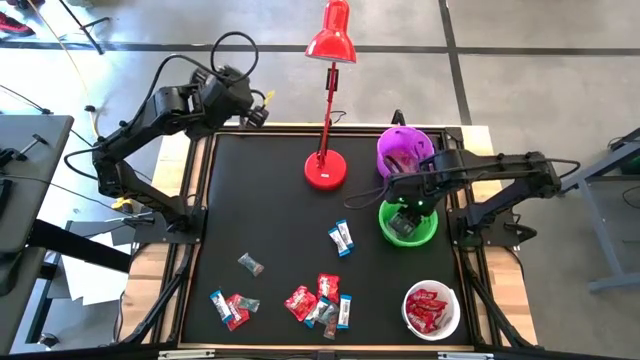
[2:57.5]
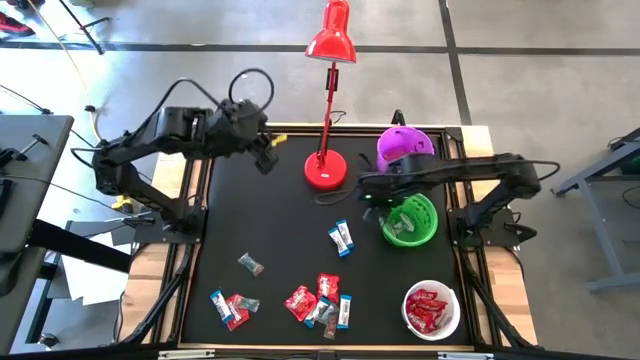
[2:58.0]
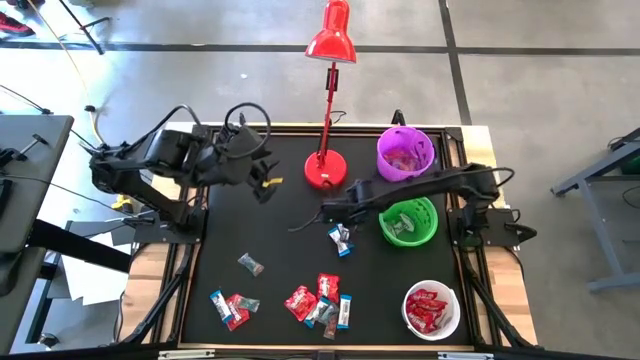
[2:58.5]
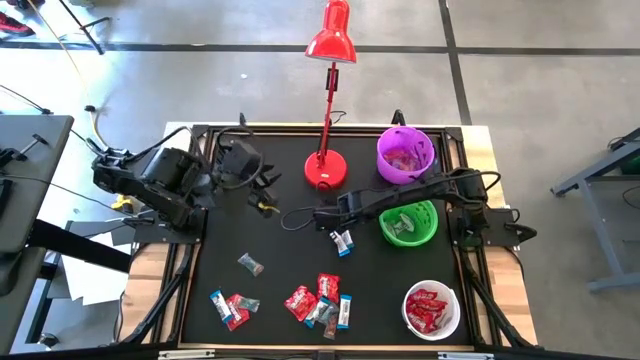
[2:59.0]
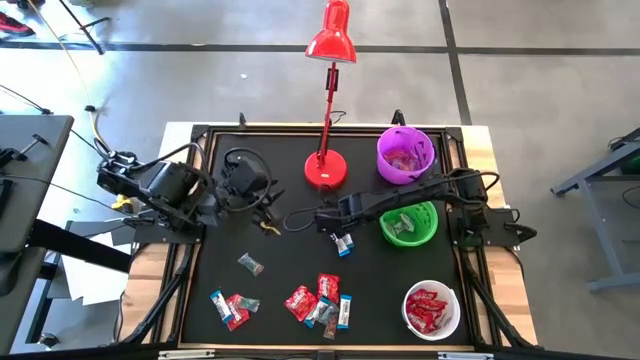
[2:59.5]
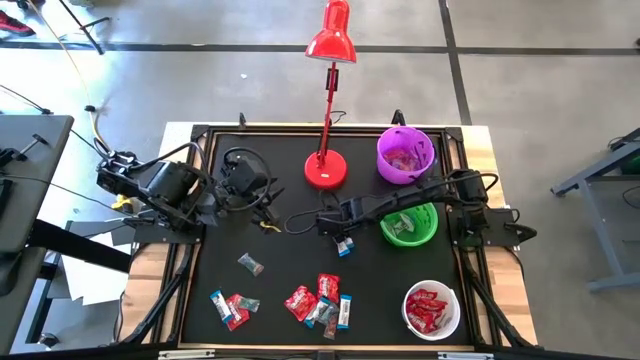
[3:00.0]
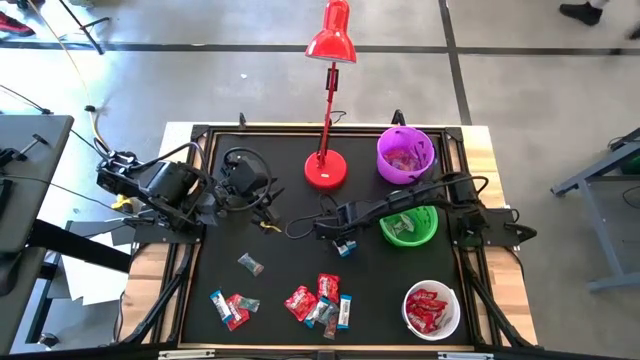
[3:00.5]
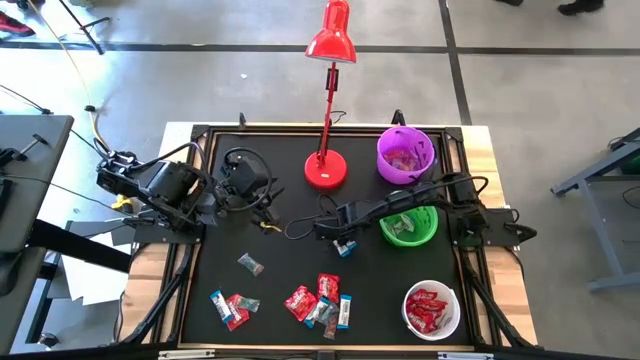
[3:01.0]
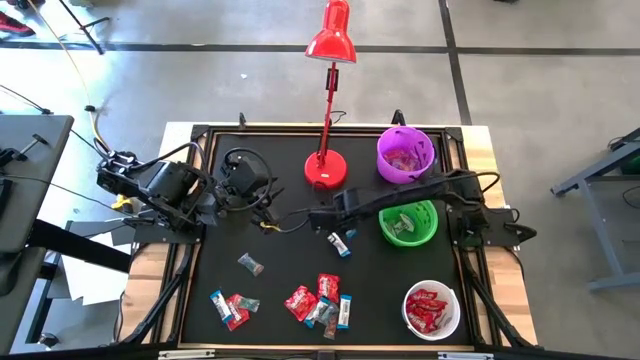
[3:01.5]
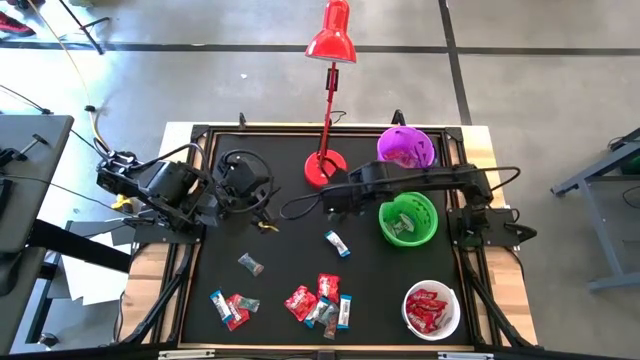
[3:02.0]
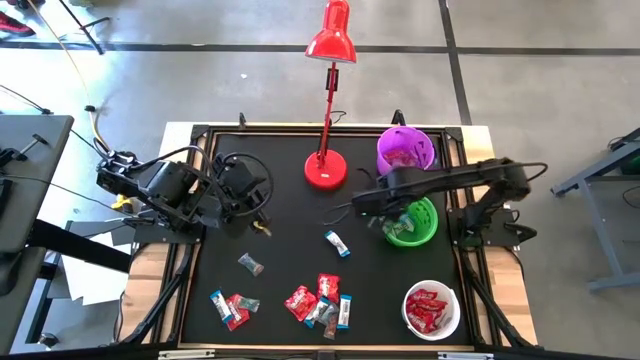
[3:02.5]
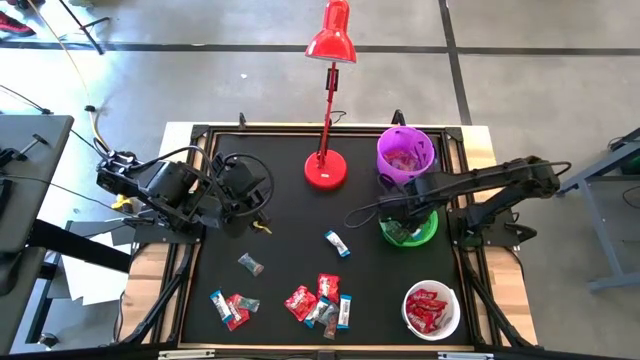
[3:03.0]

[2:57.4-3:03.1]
Task: Organize candy in baskets
Put the white chocolate bar into the green bucket

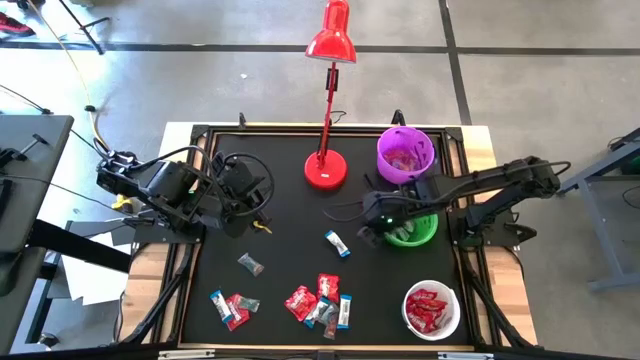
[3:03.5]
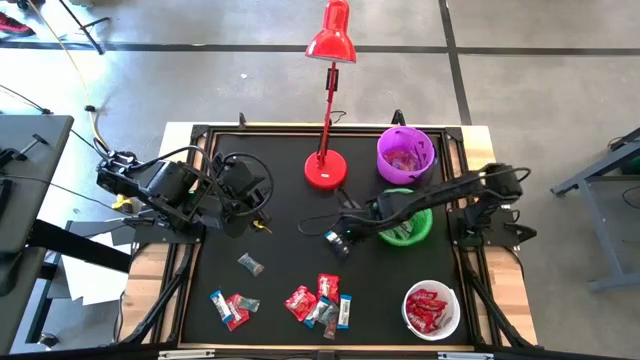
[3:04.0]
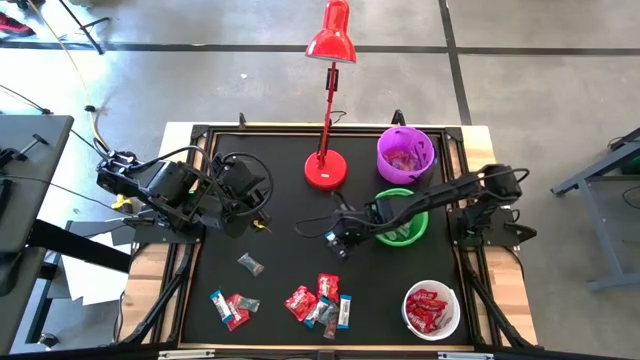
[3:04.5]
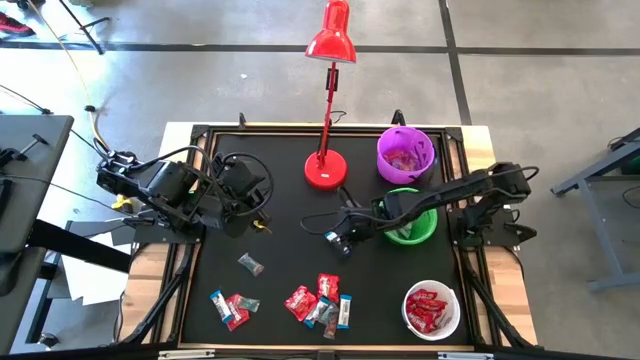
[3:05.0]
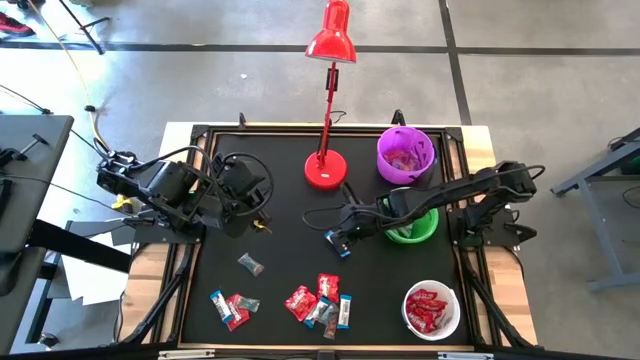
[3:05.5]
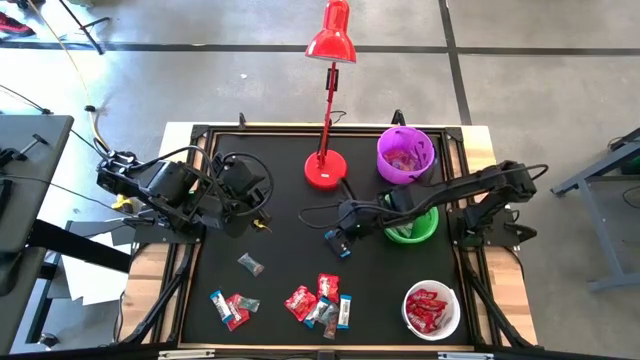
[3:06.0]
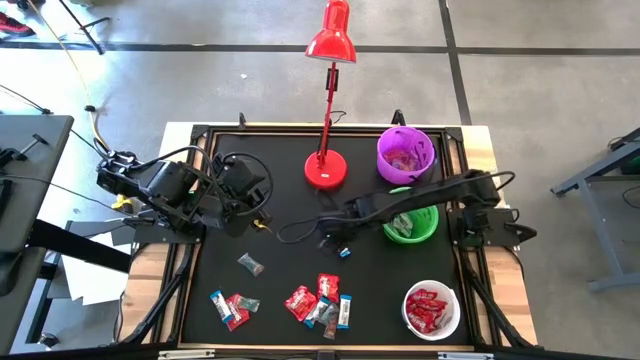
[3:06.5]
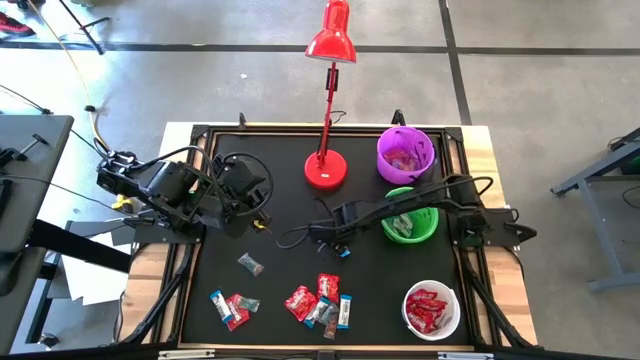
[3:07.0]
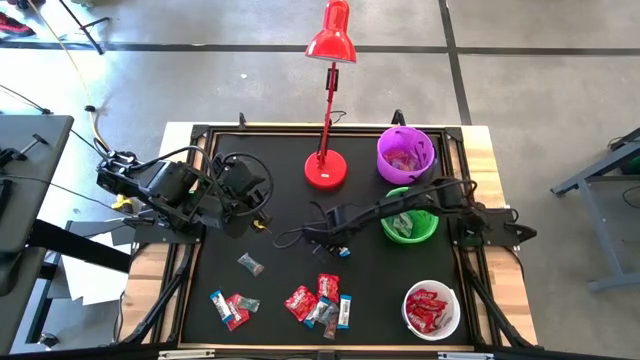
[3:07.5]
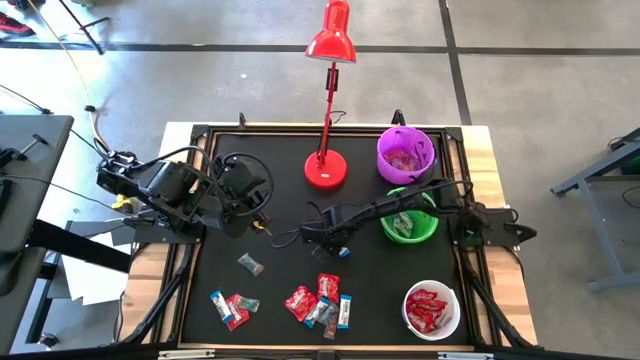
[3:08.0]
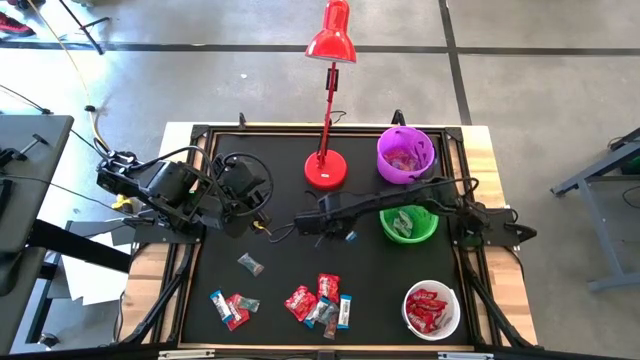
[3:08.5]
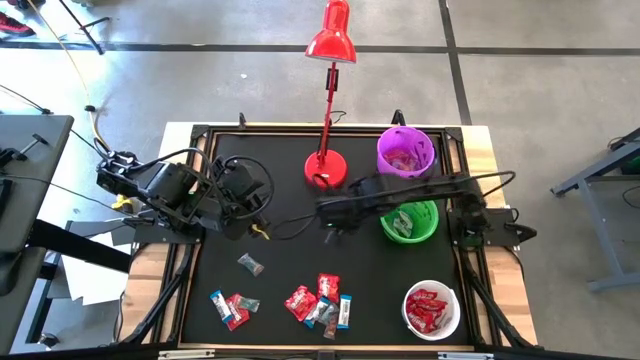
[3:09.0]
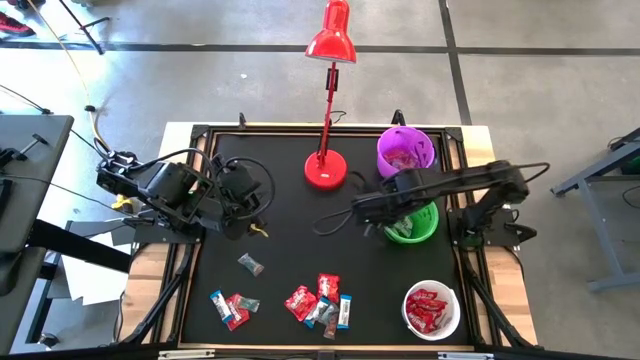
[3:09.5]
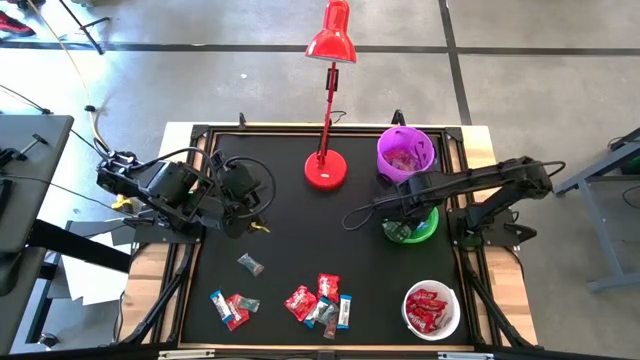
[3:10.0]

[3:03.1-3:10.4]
Put the white chocolate bar into the green bucket

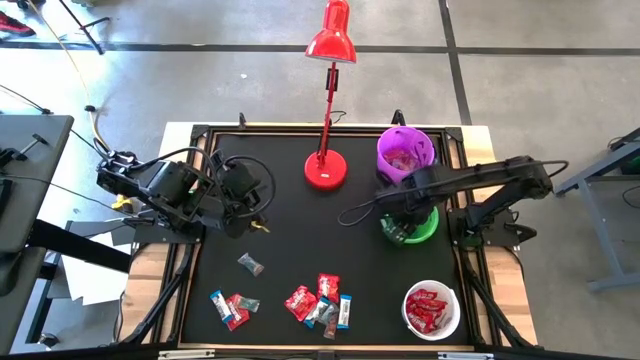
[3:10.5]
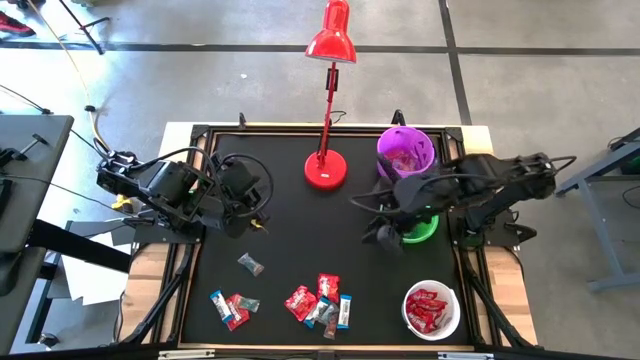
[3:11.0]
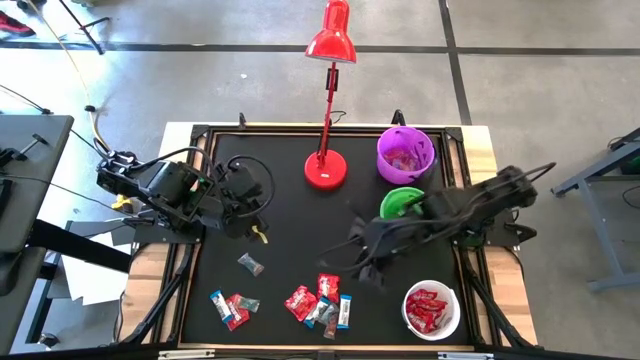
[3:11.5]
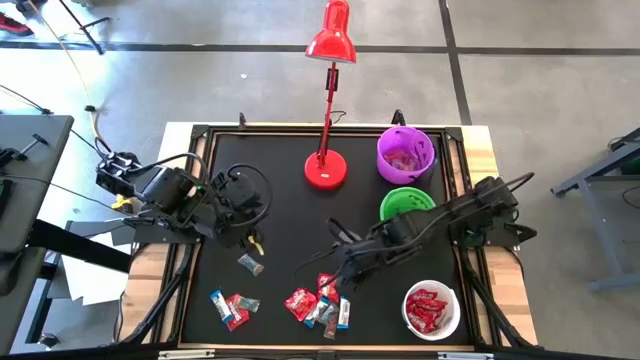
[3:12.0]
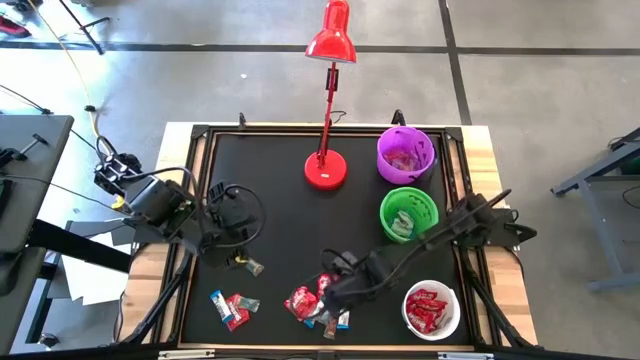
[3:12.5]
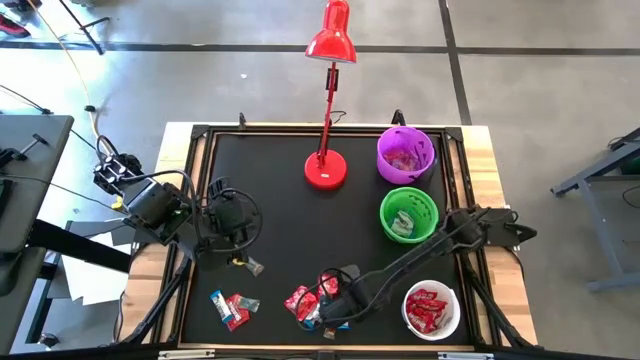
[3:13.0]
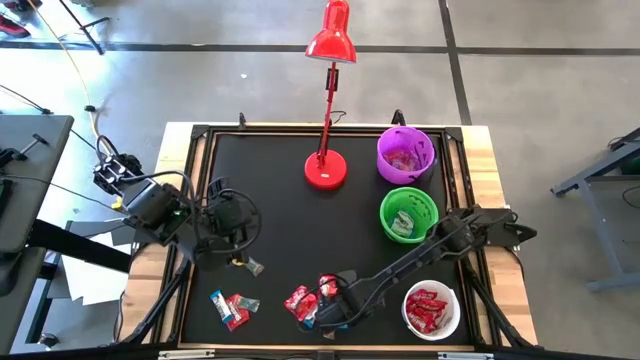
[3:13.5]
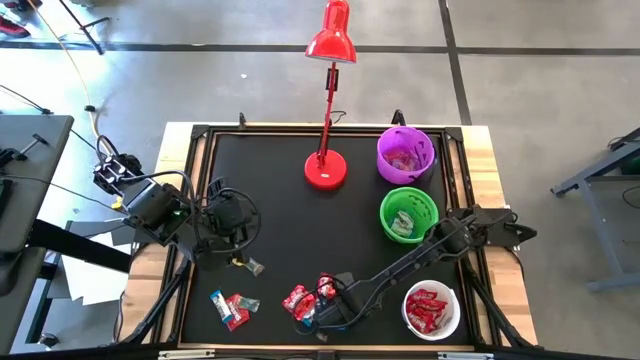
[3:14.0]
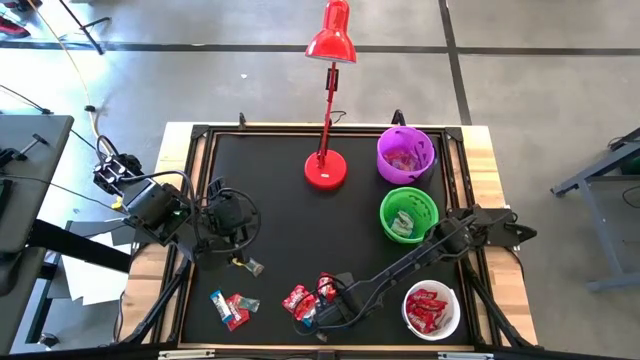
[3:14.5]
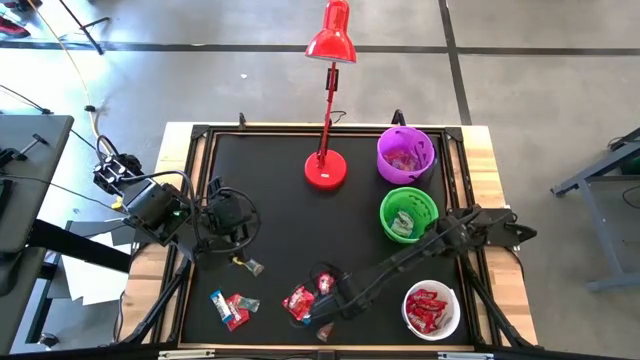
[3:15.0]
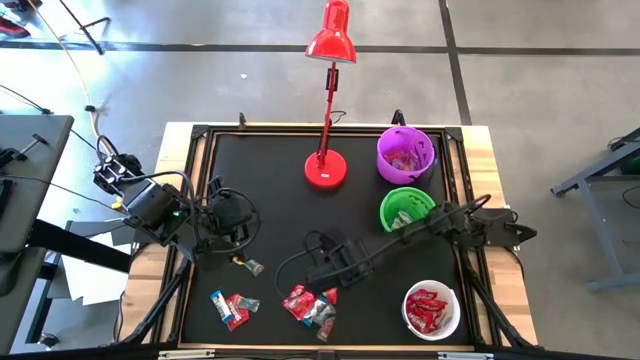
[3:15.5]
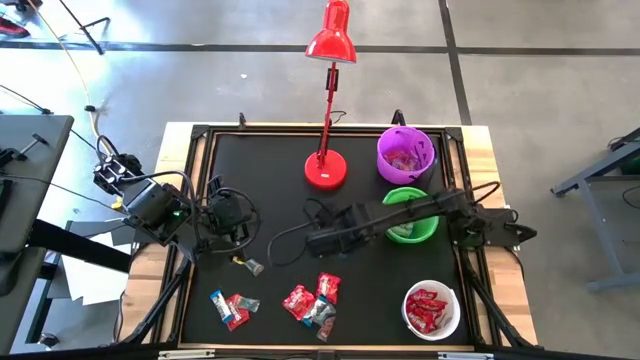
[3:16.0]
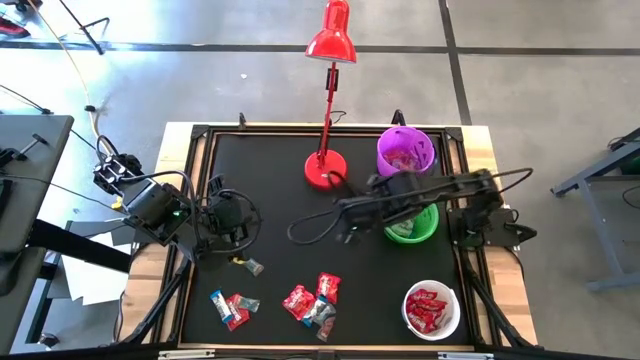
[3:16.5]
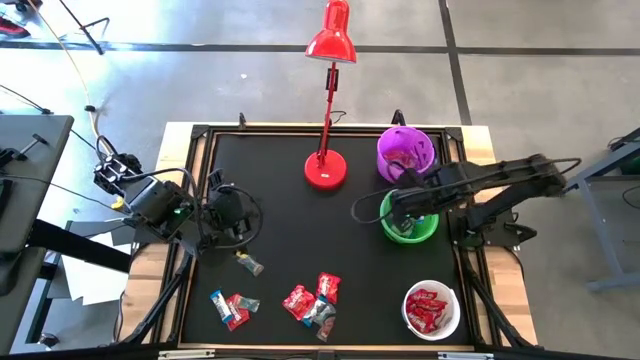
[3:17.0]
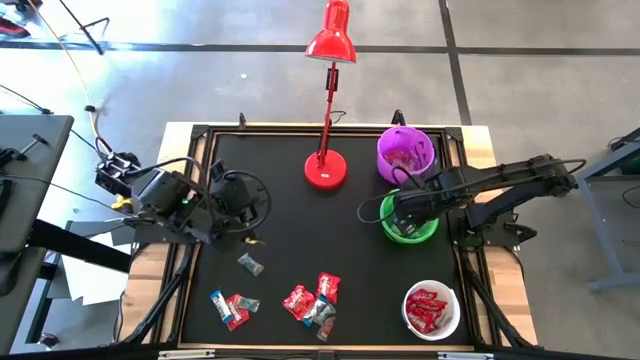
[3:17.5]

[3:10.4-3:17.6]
Put the white chocolate bar into the green bucket
